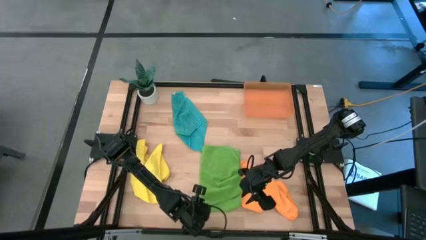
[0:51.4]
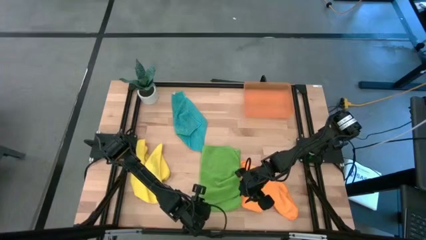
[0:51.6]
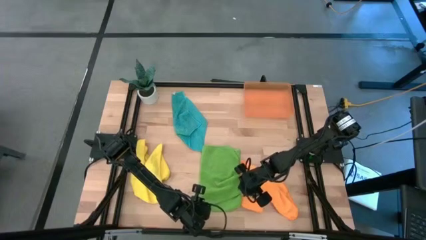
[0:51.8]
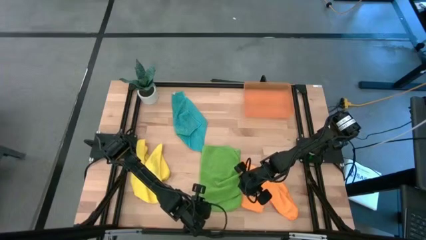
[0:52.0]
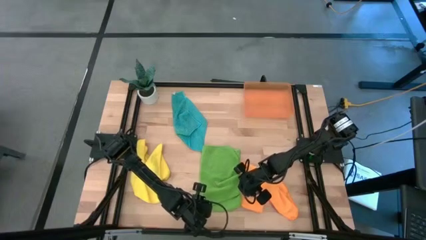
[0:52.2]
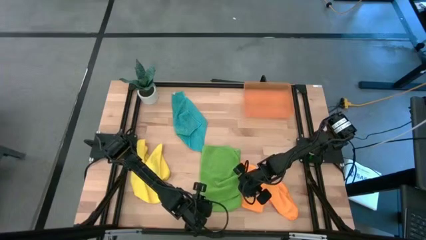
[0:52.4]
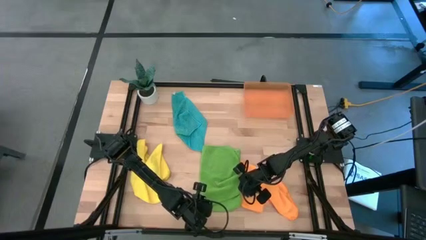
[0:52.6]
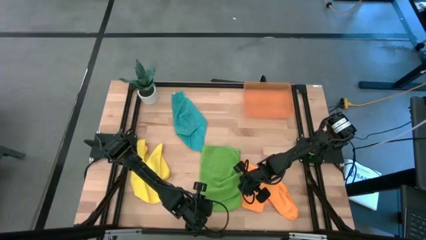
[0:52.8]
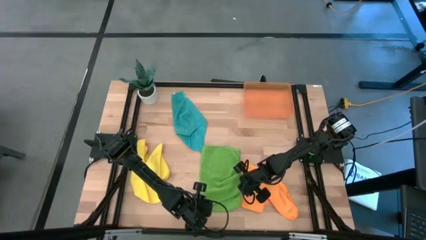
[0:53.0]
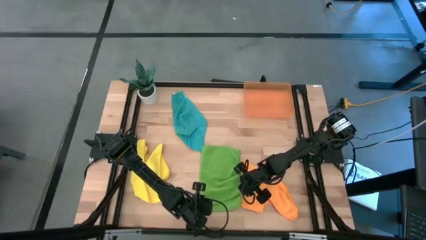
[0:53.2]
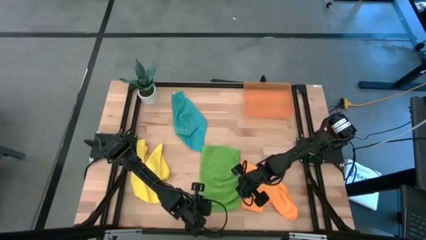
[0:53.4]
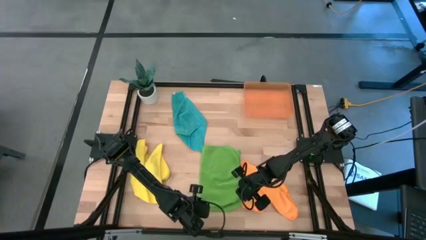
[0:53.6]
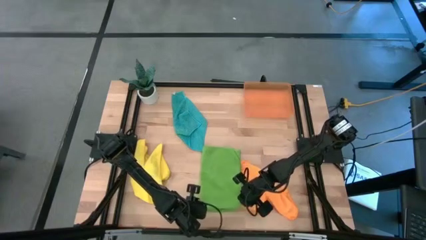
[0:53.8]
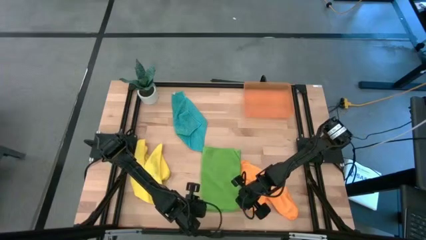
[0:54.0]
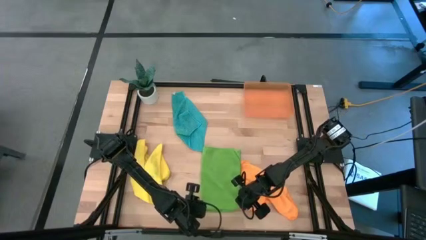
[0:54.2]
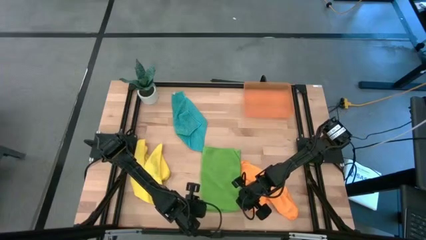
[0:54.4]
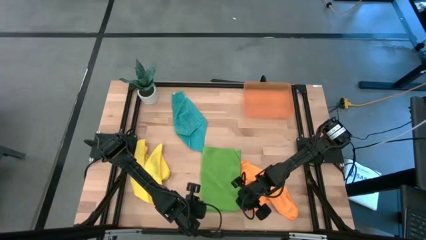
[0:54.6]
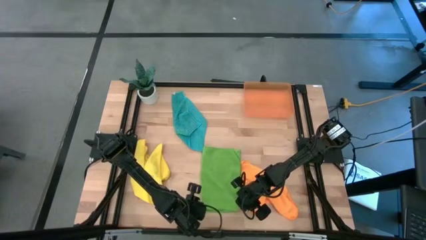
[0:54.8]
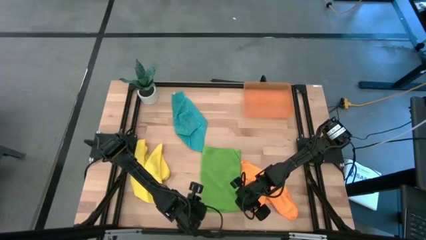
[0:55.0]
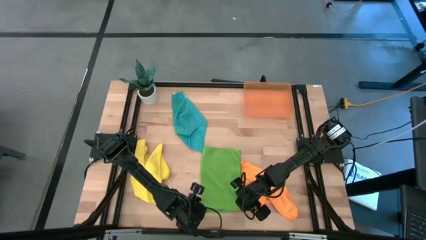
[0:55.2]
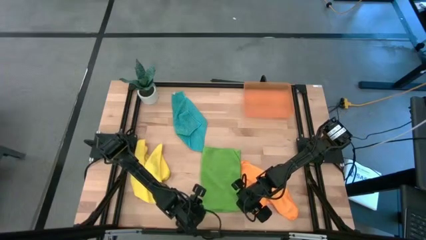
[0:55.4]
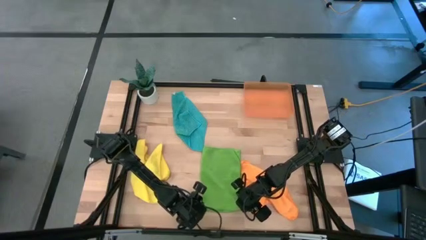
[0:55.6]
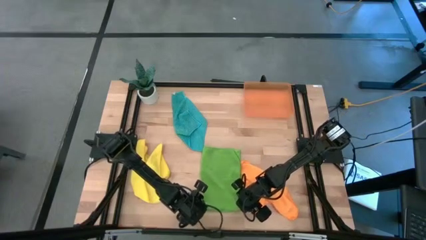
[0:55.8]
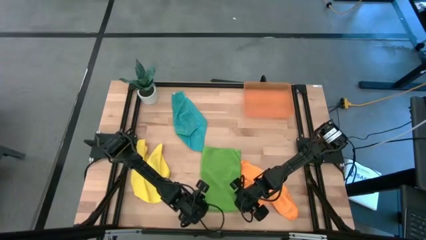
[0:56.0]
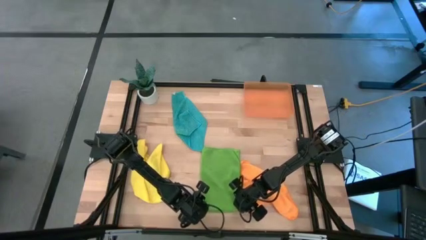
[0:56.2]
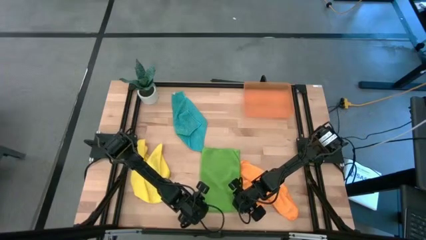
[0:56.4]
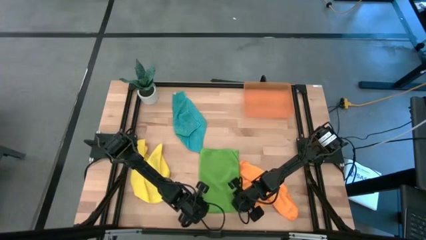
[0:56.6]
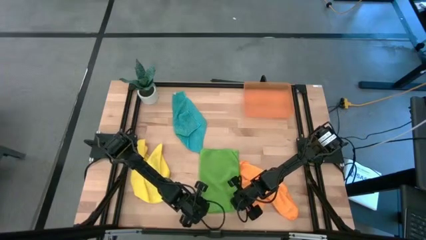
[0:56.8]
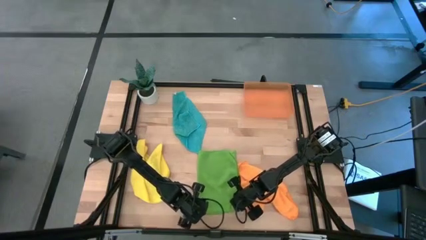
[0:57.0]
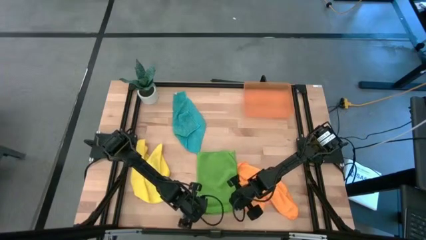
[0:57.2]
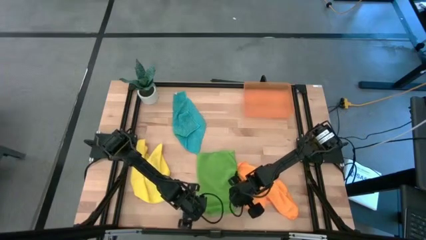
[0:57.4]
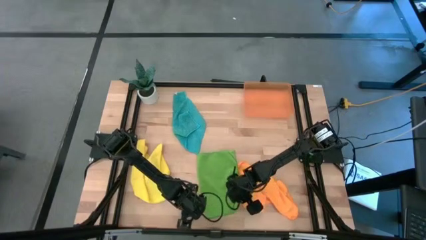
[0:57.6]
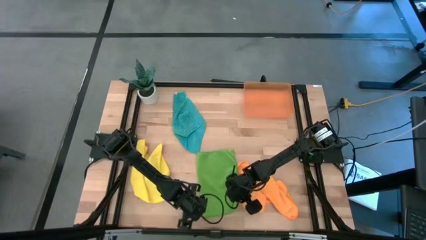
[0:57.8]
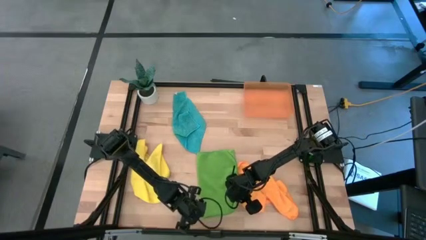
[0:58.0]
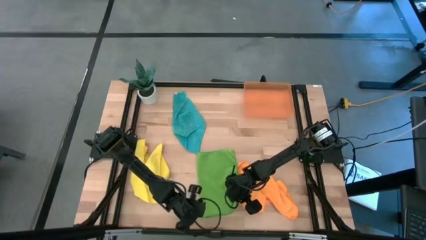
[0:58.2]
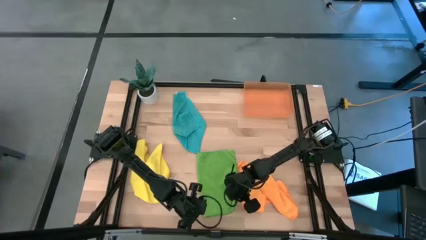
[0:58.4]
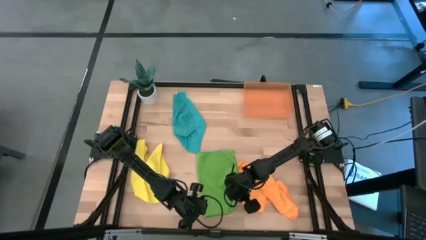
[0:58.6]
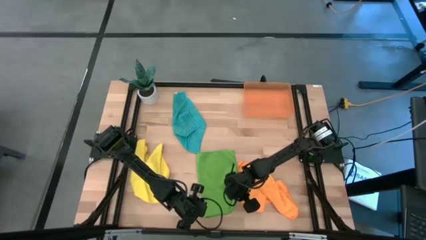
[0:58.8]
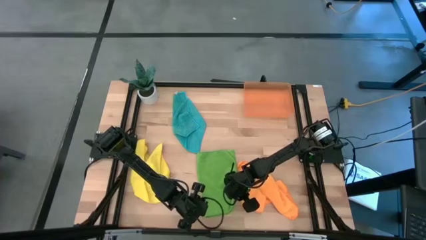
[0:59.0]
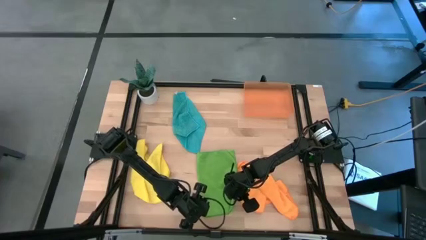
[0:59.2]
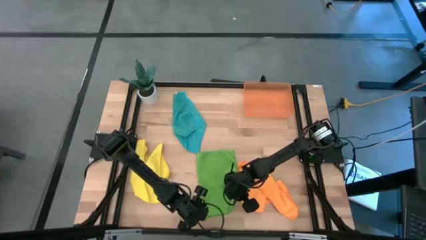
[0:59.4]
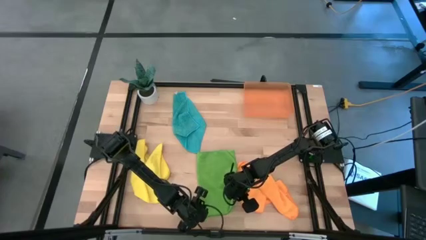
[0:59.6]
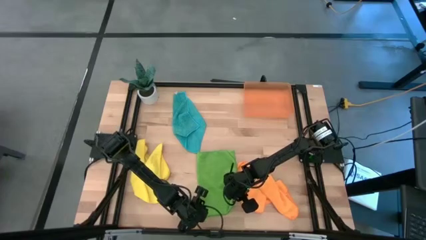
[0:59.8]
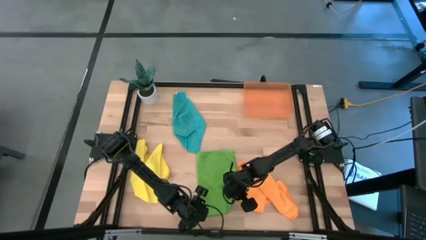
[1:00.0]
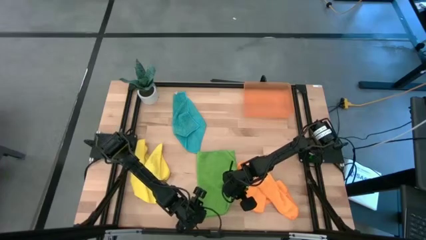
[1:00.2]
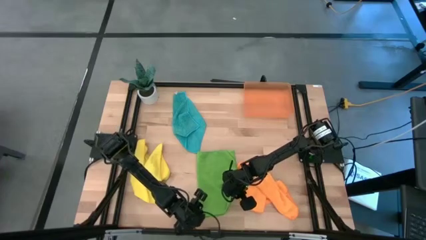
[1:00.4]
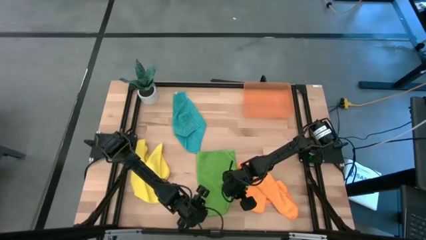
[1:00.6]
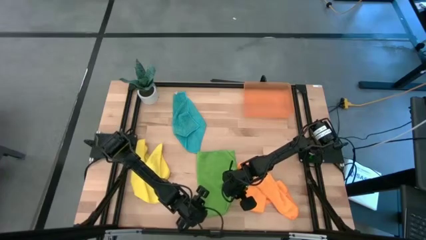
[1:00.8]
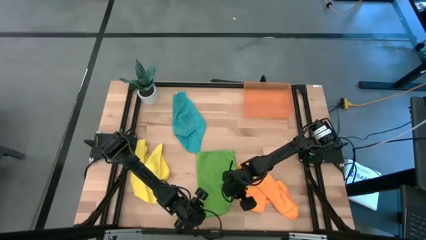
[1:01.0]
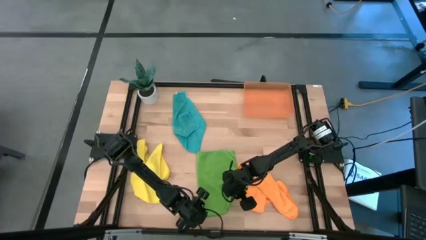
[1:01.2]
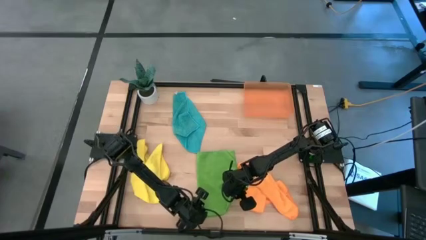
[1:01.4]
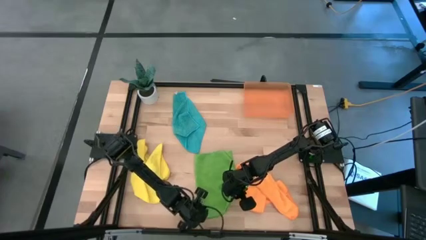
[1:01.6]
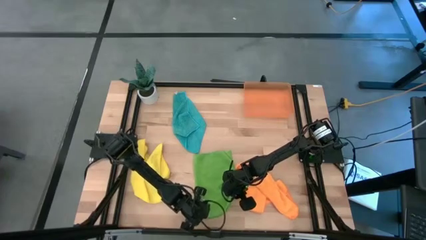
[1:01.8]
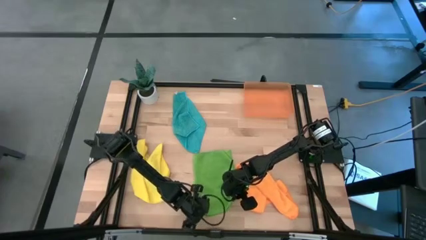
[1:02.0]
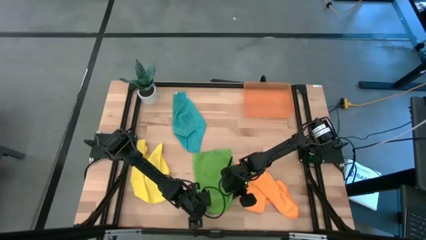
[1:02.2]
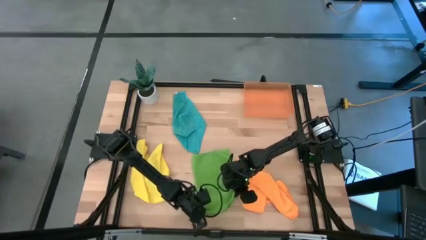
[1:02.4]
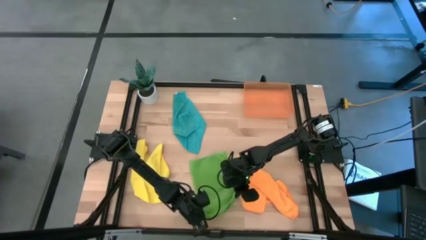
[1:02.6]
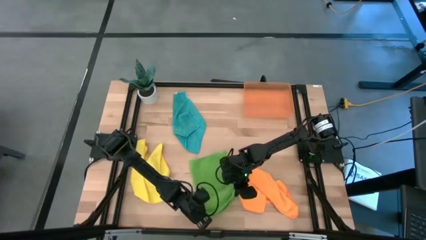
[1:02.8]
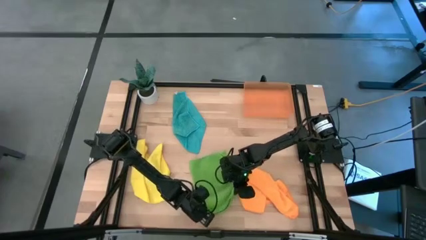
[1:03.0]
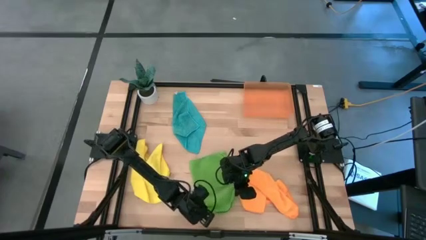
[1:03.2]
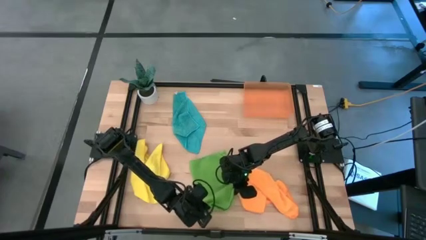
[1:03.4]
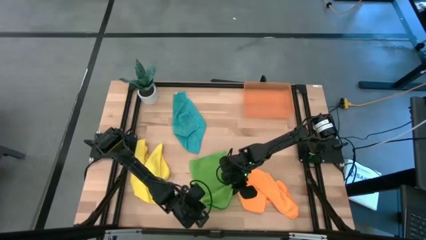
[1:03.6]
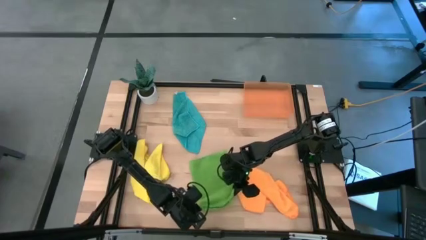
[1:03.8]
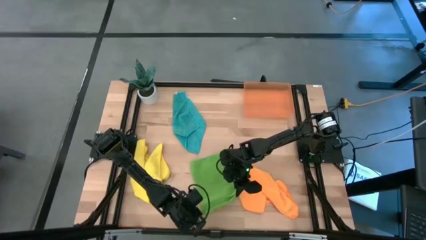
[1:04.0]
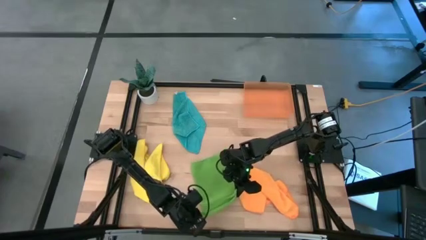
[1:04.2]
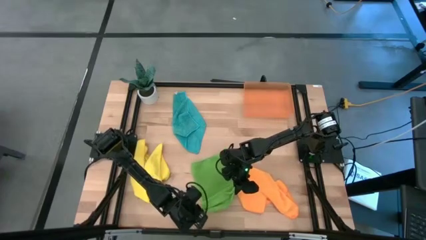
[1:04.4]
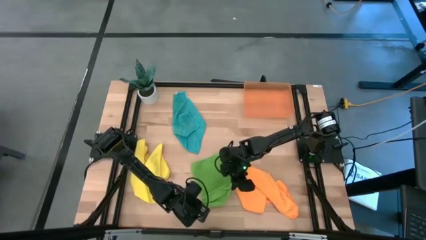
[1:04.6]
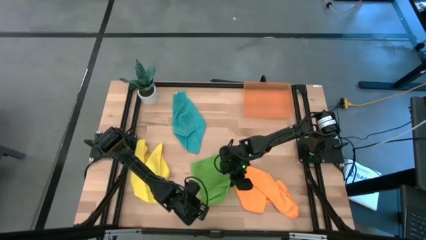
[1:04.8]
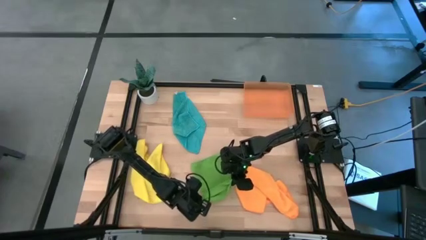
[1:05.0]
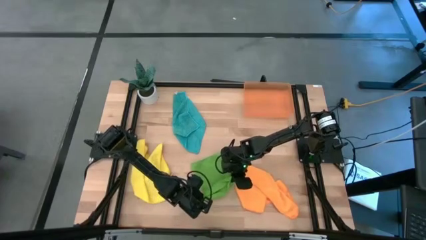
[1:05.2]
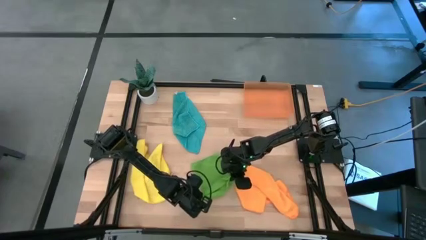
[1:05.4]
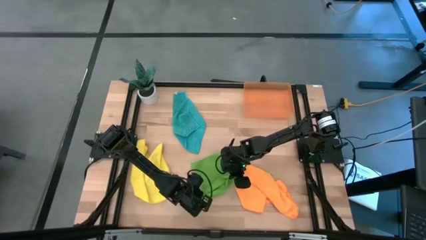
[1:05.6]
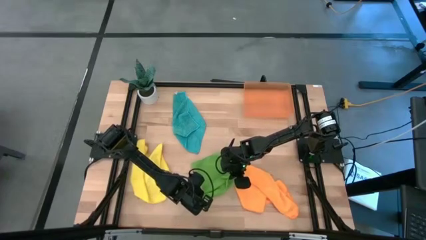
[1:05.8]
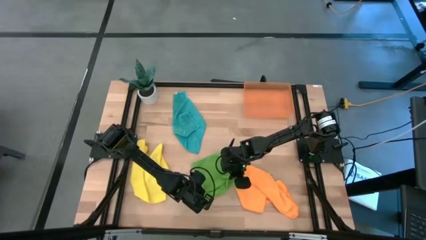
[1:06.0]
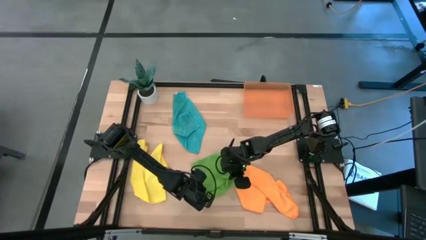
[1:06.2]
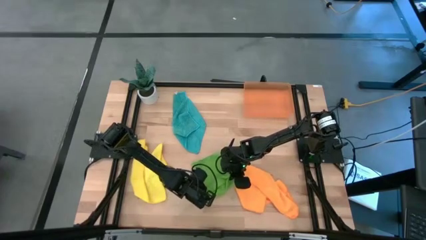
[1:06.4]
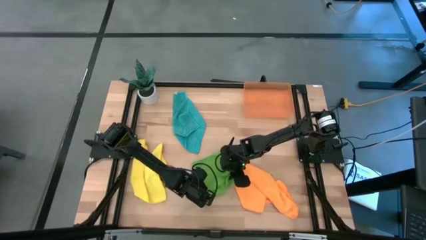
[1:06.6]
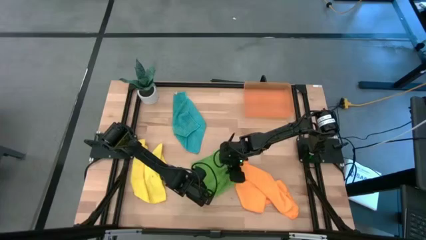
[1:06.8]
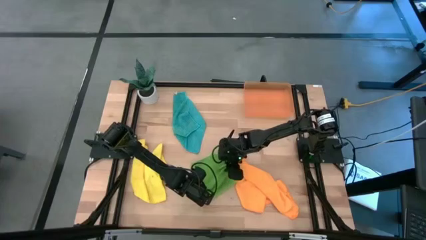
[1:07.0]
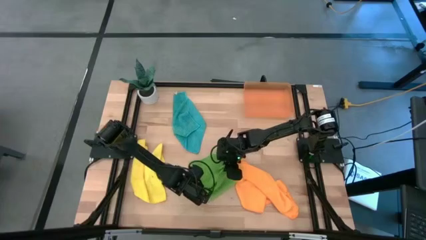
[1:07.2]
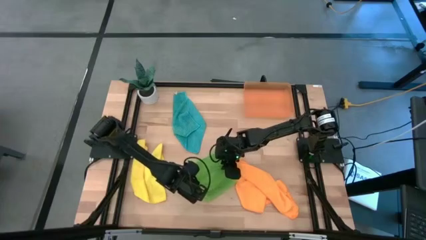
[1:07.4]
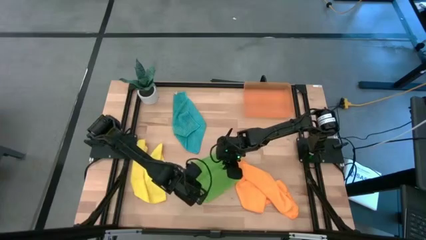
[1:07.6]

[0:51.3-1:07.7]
Task: Roll microfiber towels into tight, uniform cylinder then place into a basket
Fold the green towel
